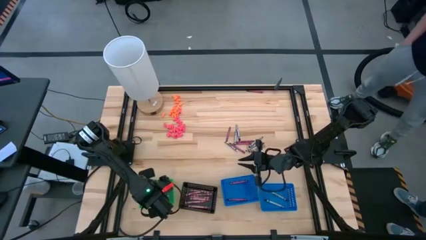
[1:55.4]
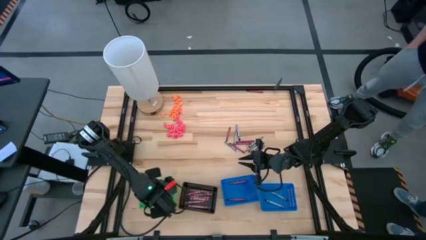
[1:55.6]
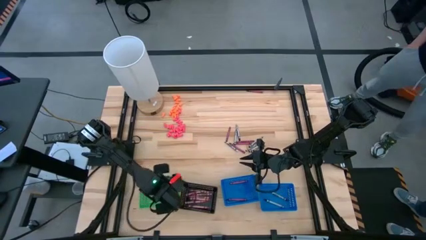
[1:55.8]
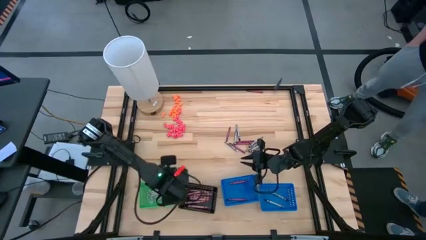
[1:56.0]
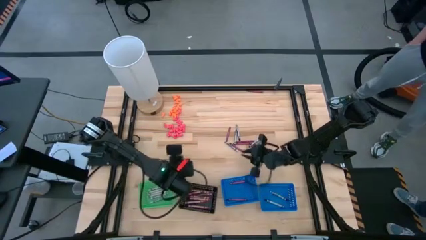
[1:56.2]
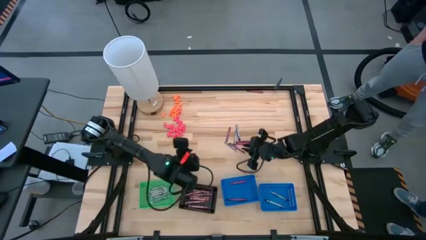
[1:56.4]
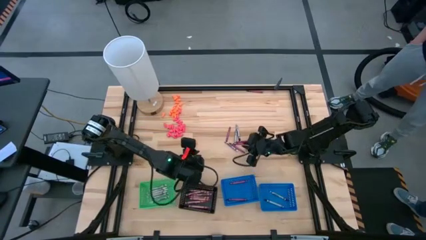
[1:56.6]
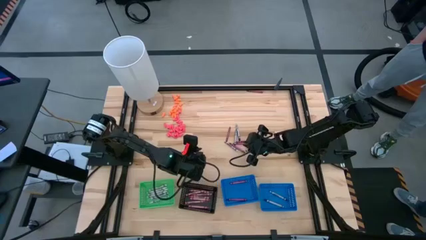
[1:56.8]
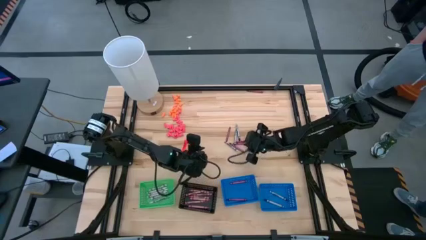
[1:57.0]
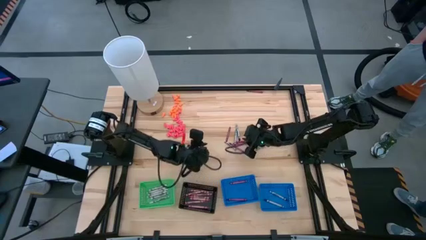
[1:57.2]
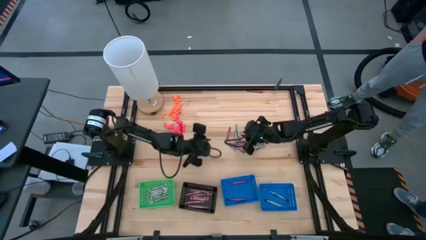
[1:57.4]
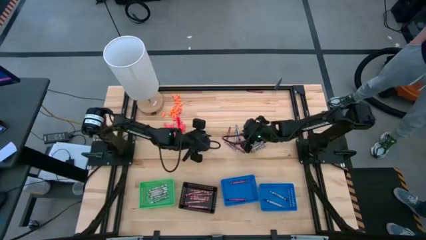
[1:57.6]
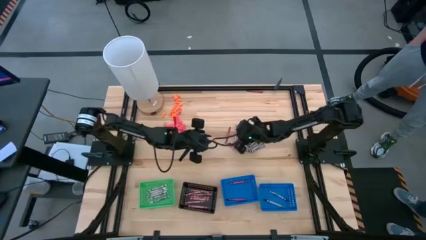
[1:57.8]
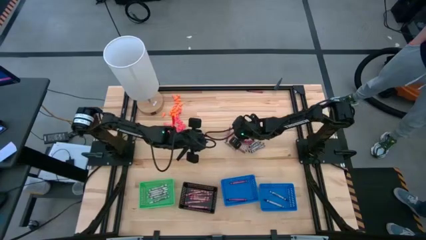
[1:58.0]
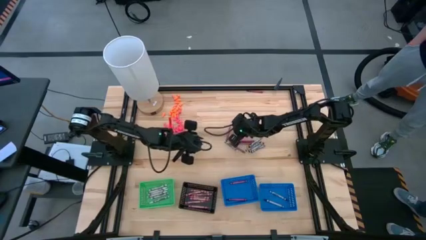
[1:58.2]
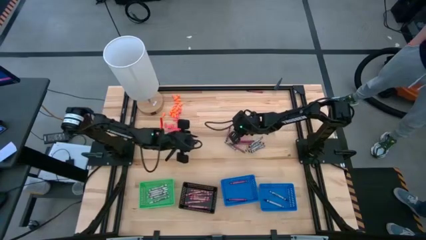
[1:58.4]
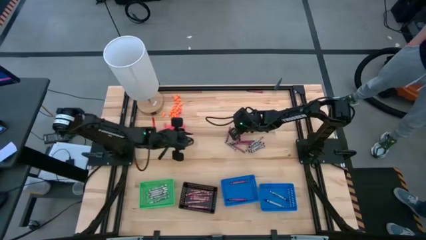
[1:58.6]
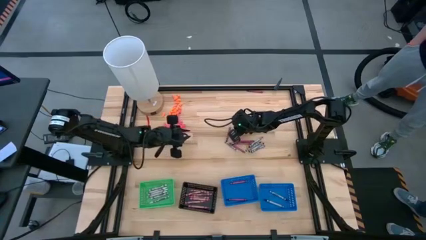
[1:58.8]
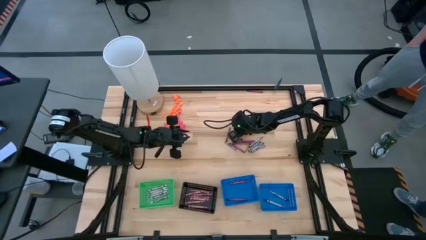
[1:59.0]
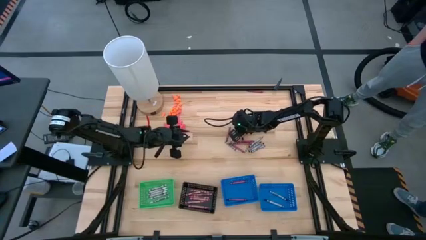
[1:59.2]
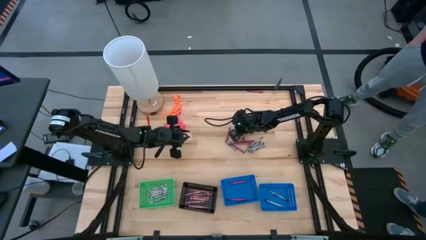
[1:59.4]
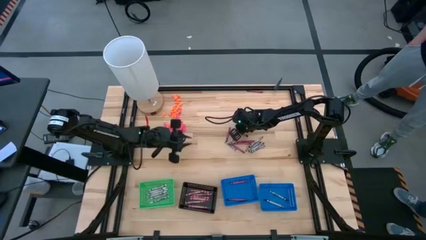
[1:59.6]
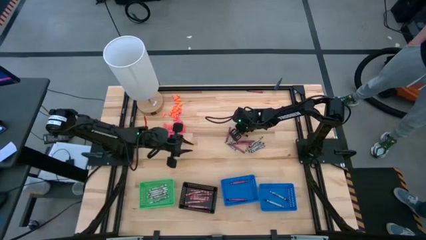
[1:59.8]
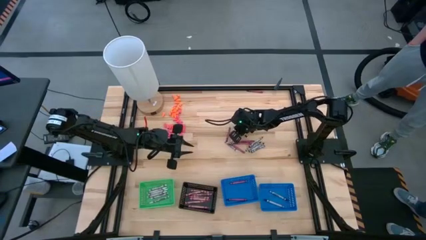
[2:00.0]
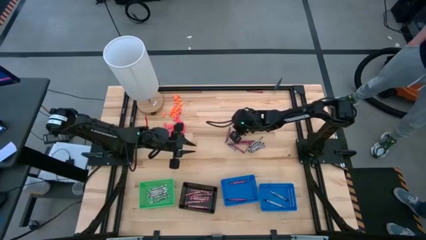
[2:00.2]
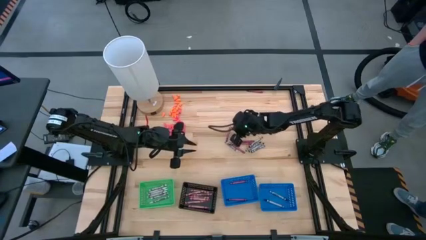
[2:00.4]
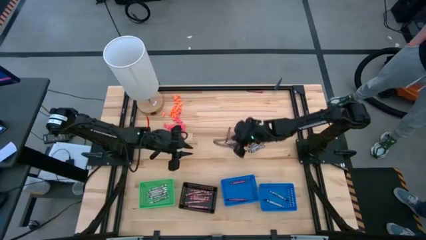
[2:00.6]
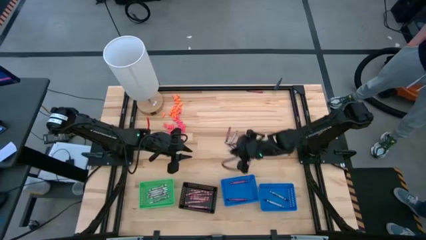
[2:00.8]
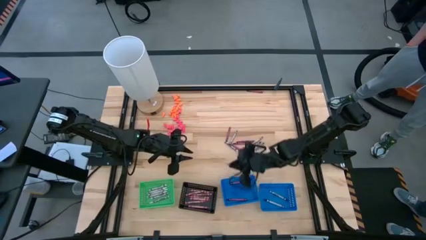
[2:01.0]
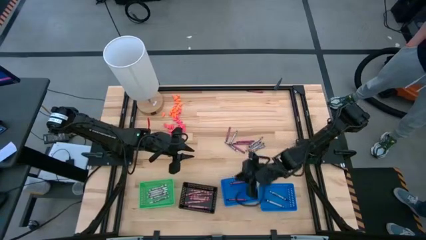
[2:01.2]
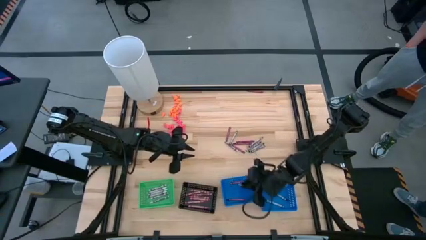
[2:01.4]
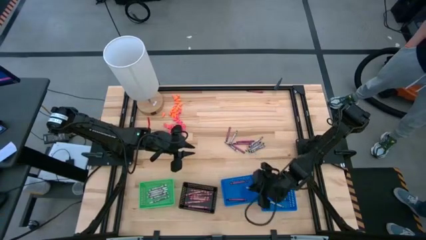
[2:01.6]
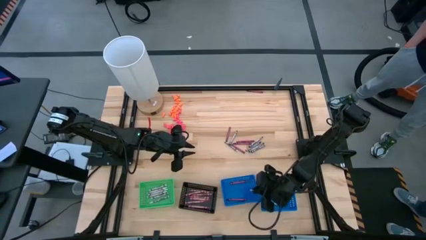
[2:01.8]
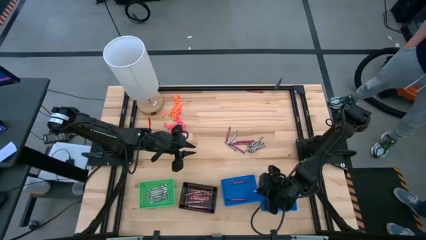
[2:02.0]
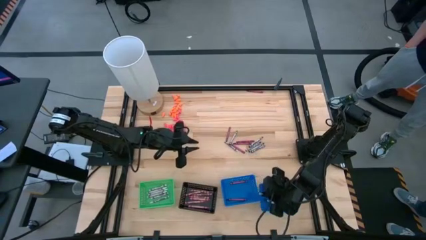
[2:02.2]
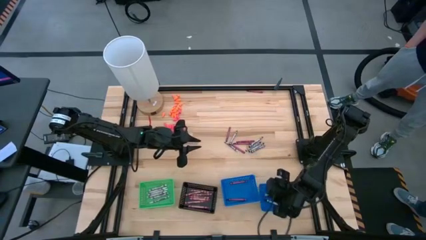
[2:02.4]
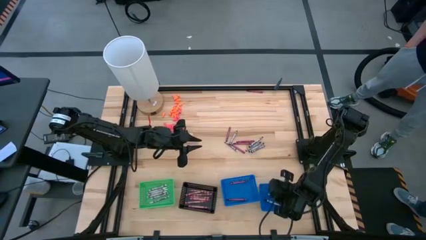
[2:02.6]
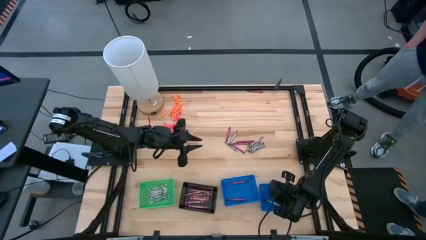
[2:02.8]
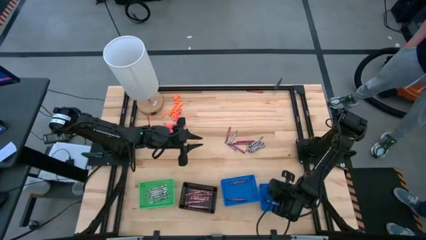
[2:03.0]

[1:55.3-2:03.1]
Task: Sort crayons
Put the black crayon into the right blue bin

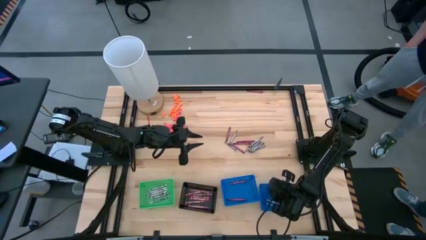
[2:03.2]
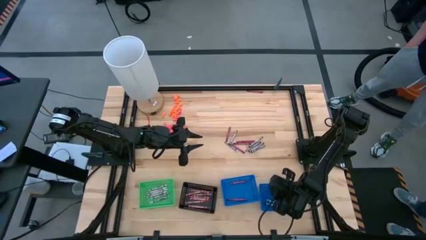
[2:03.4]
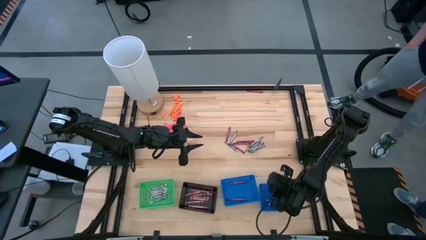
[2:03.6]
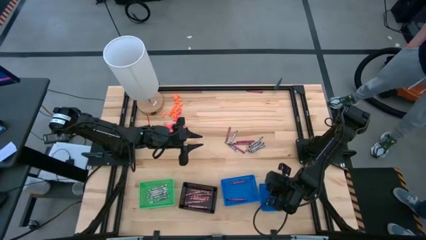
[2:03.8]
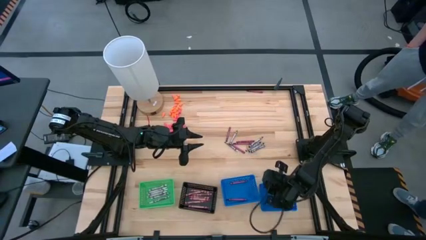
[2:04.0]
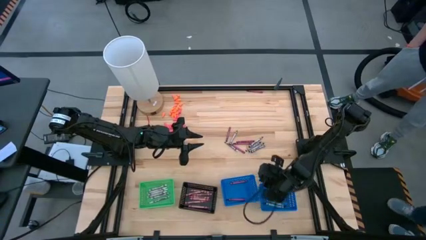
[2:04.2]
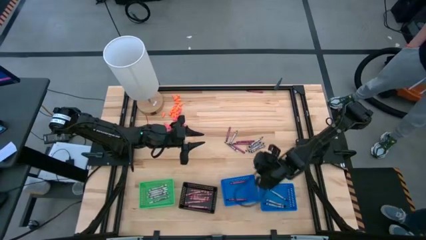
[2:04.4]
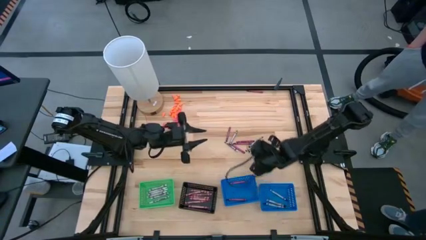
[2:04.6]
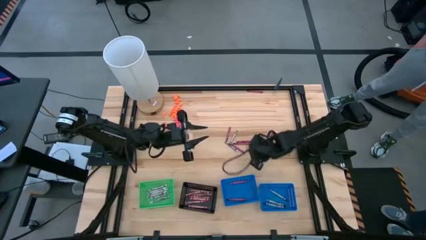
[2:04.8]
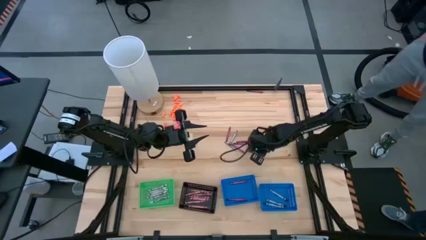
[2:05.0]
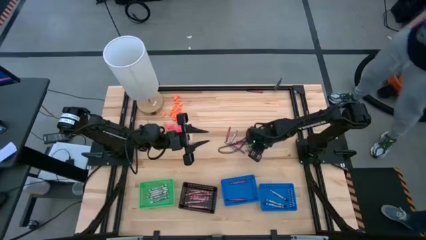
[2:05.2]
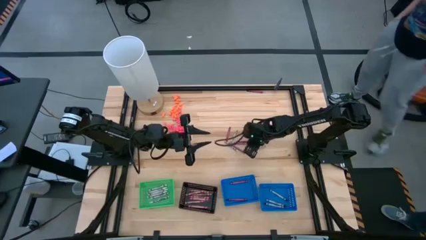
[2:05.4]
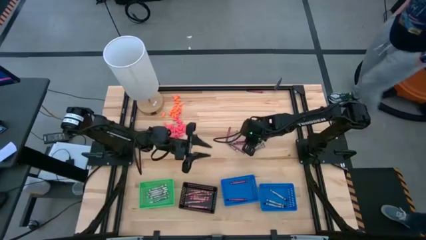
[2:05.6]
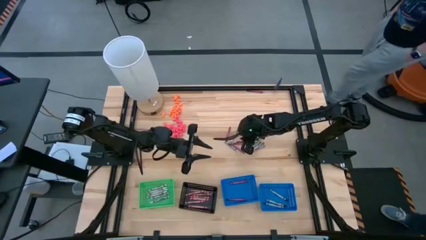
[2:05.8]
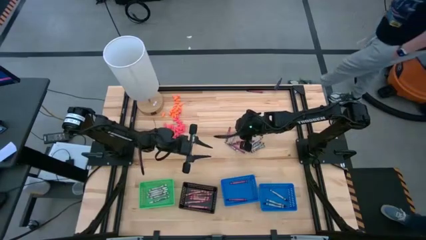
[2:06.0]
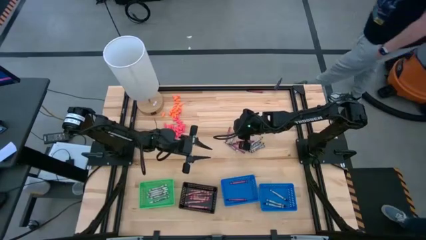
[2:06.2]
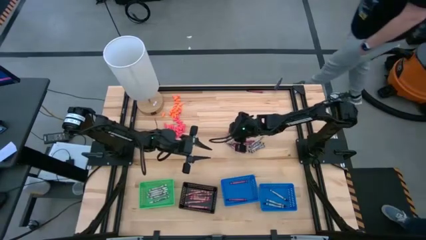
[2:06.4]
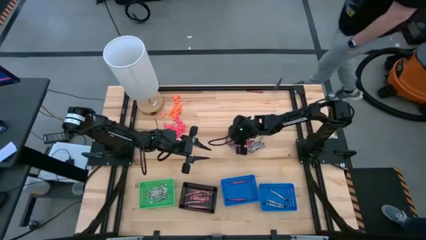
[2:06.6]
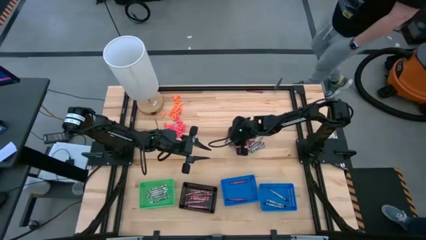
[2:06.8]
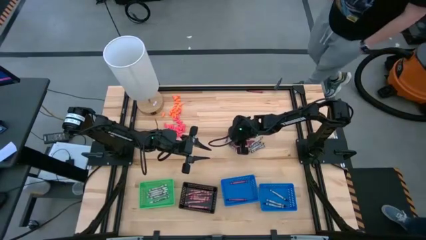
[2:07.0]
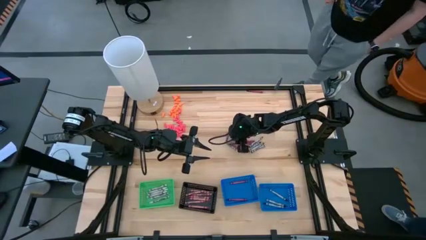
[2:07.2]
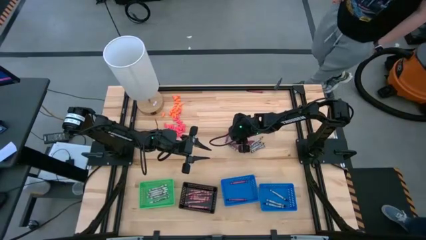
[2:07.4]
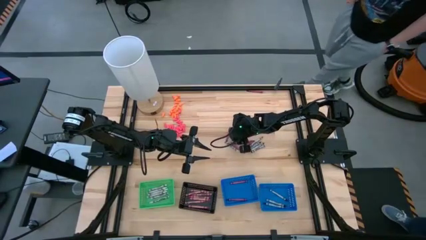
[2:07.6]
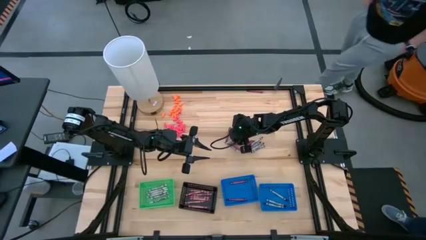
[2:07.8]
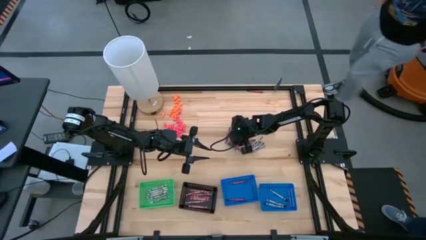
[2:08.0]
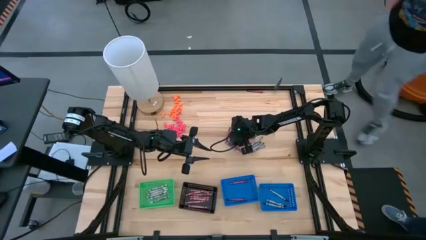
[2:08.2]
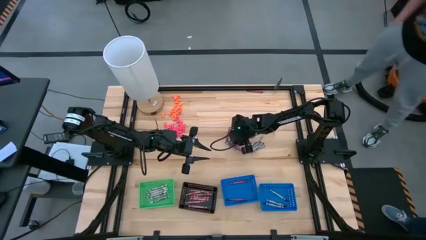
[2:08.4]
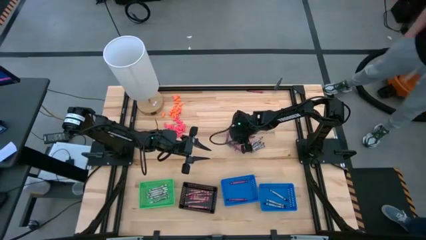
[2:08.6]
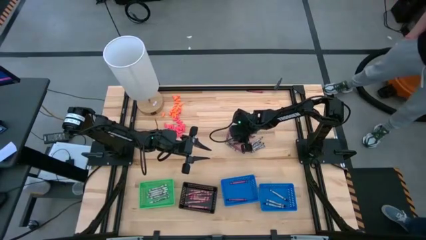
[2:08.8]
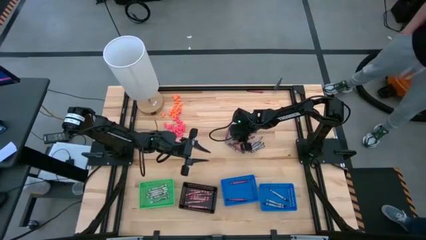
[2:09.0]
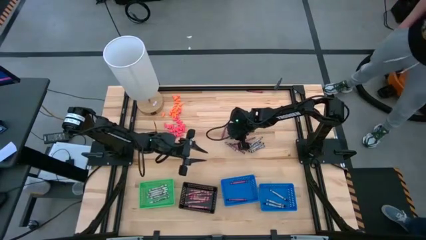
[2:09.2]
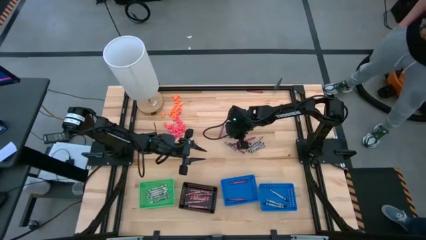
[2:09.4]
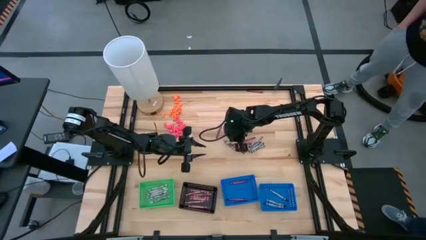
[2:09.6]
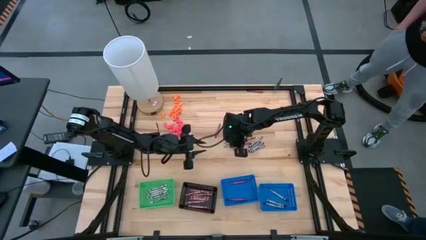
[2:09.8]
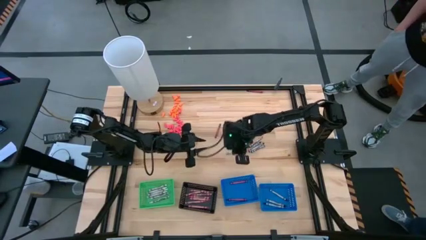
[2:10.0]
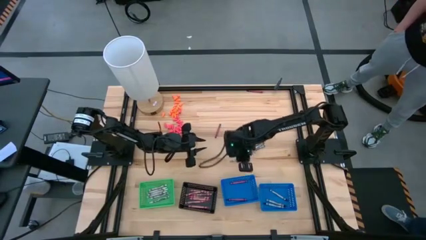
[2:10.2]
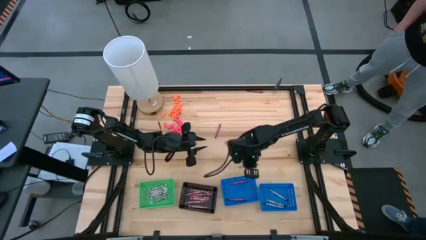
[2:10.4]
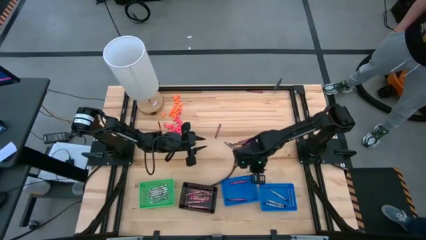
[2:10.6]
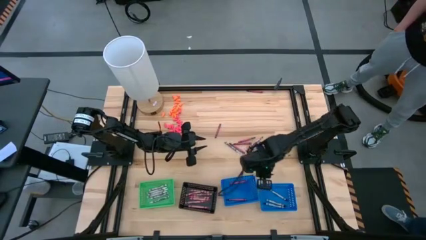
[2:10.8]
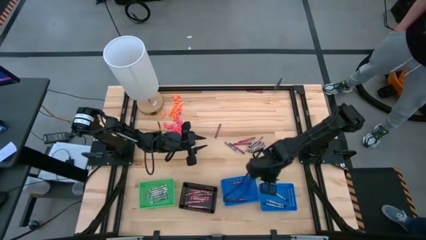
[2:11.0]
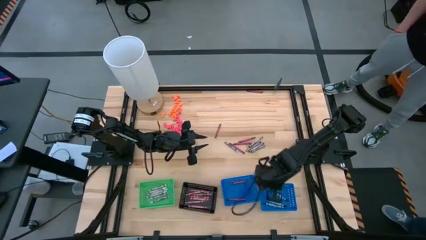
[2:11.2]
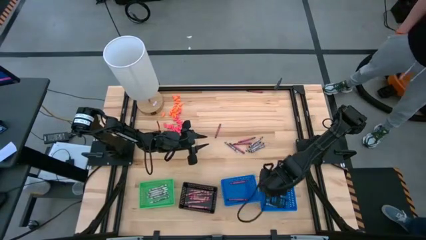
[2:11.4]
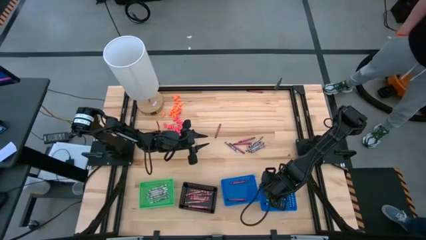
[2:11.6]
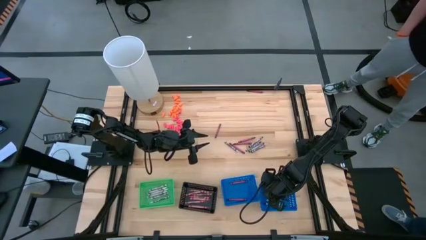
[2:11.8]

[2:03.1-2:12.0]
Put the black crayon into the right blue bin

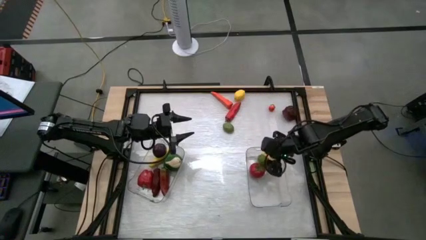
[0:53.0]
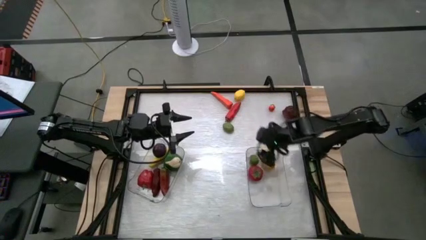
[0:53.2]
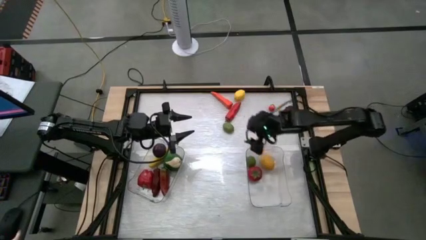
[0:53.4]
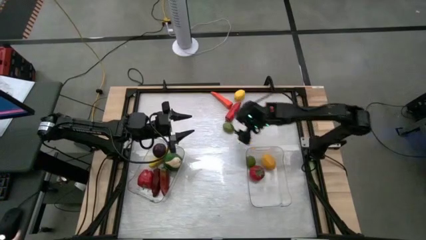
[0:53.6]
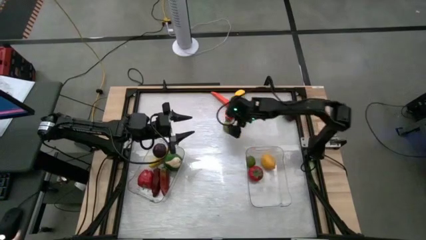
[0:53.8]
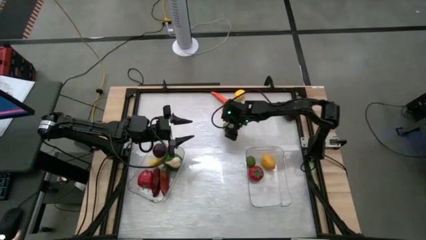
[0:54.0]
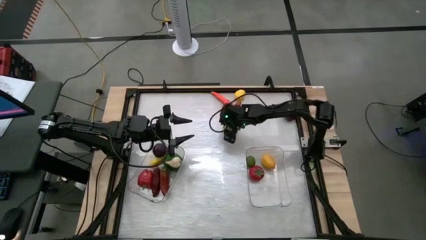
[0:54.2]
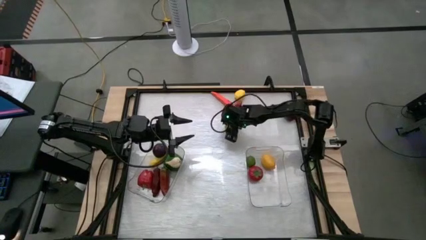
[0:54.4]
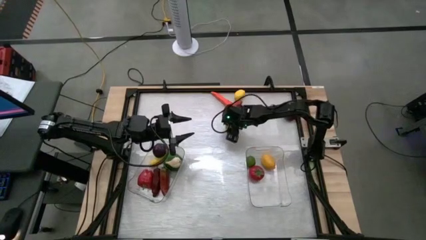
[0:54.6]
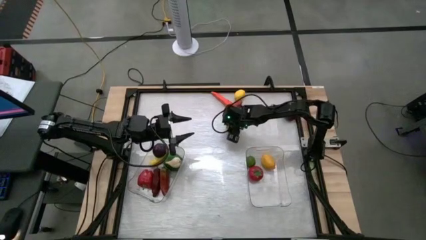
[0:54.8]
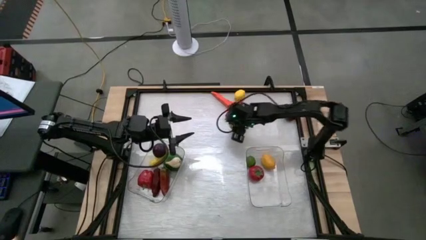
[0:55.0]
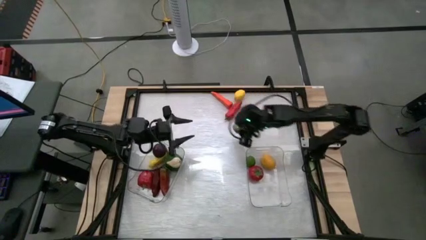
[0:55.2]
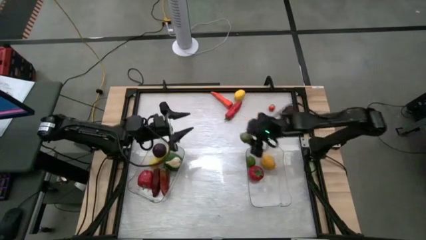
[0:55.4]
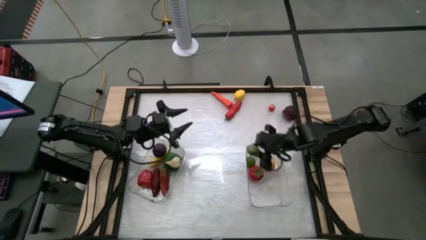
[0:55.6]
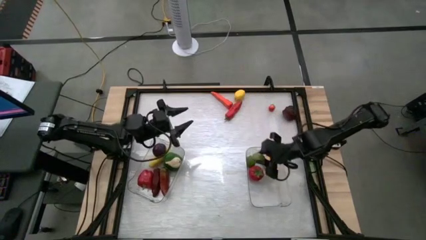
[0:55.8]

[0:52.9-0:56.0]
Task: Sort produce into baskets
Put the green lime into the right transparent bin
